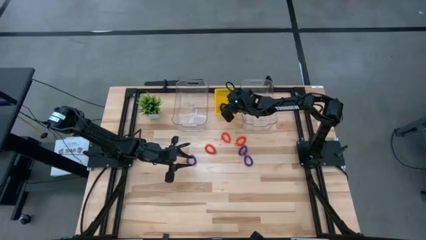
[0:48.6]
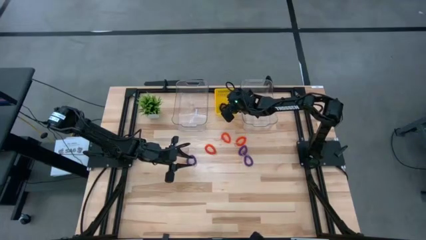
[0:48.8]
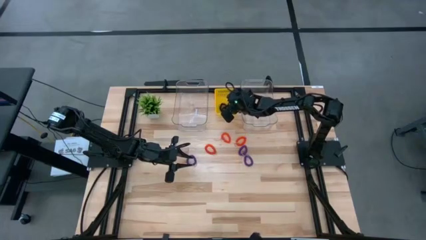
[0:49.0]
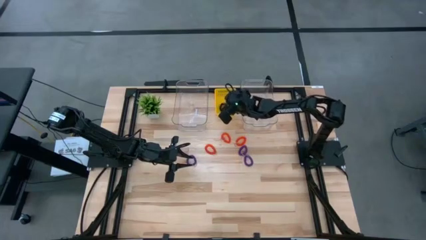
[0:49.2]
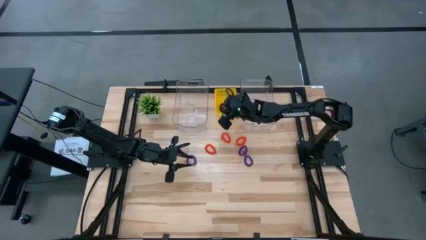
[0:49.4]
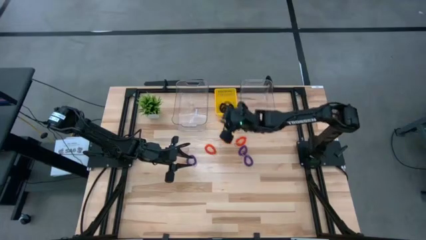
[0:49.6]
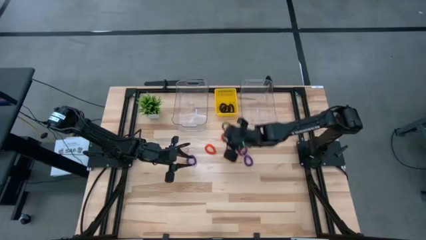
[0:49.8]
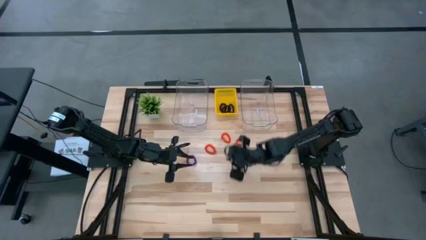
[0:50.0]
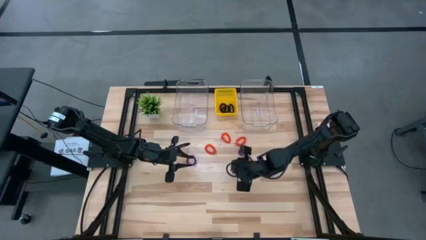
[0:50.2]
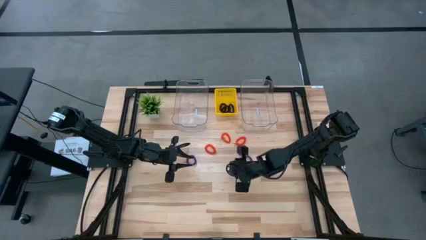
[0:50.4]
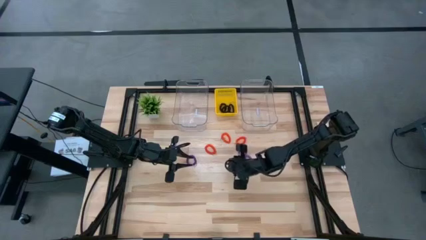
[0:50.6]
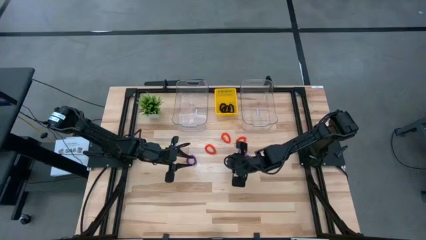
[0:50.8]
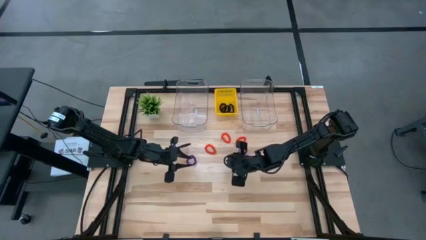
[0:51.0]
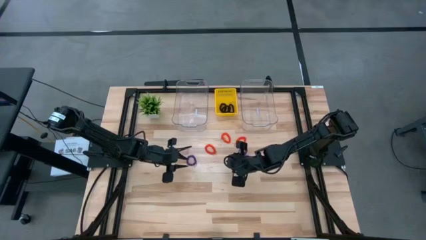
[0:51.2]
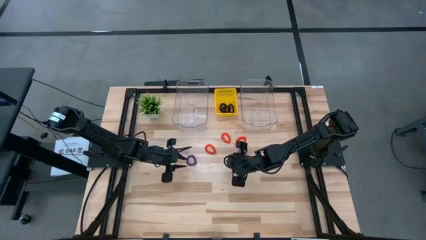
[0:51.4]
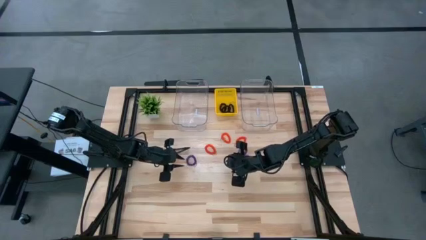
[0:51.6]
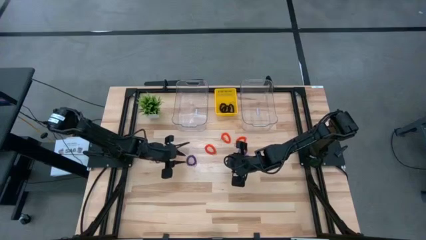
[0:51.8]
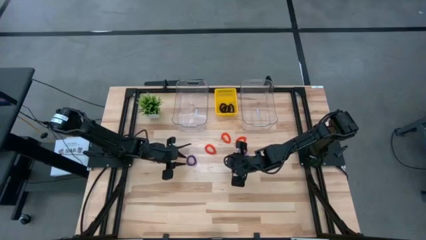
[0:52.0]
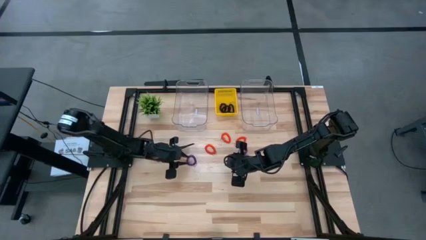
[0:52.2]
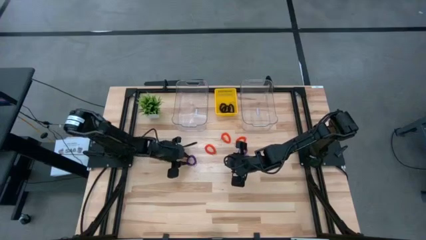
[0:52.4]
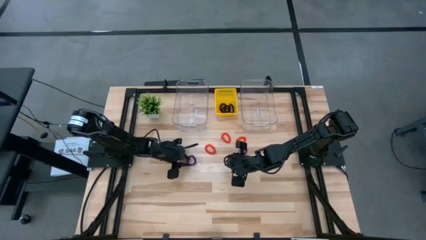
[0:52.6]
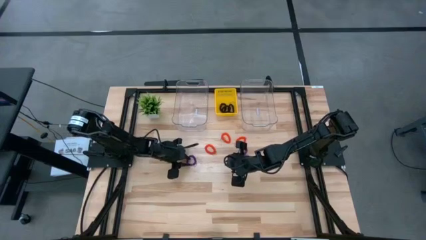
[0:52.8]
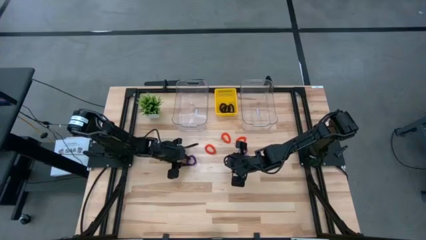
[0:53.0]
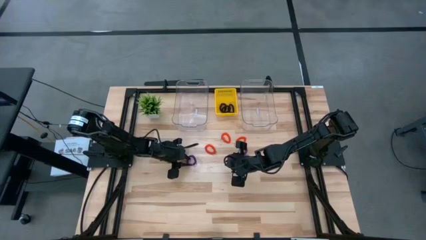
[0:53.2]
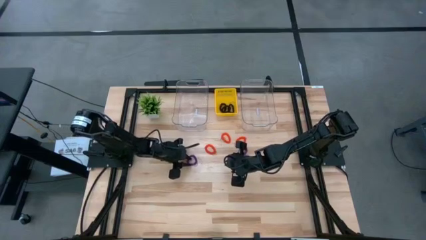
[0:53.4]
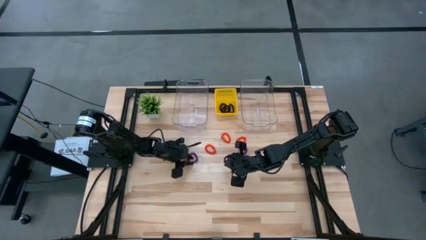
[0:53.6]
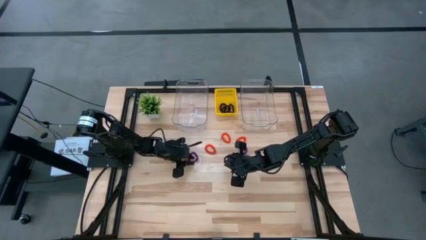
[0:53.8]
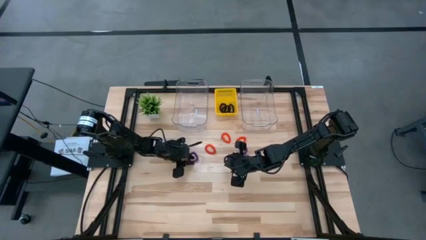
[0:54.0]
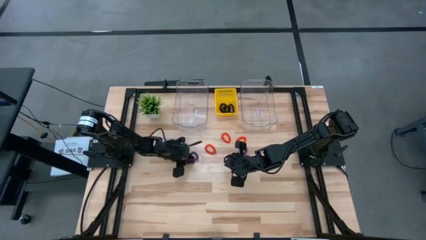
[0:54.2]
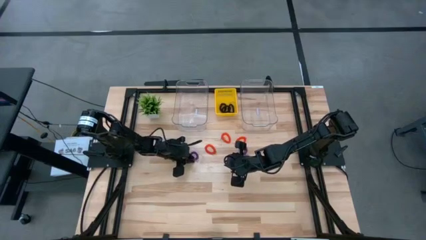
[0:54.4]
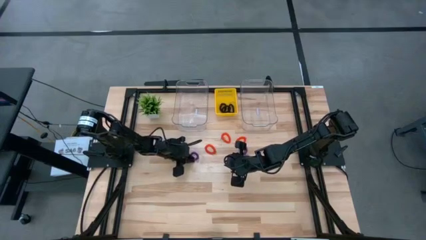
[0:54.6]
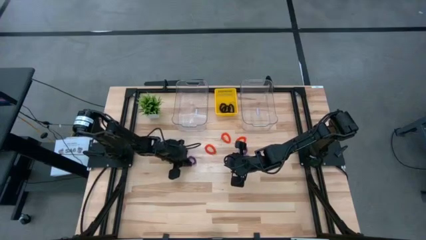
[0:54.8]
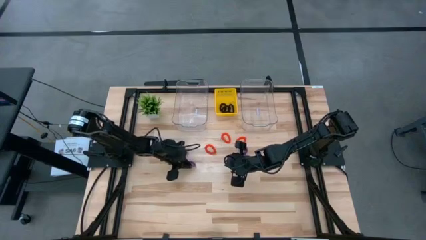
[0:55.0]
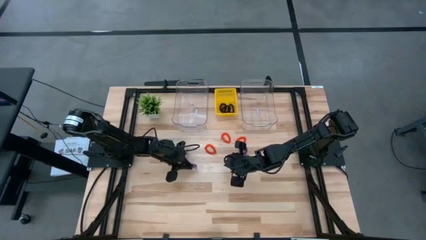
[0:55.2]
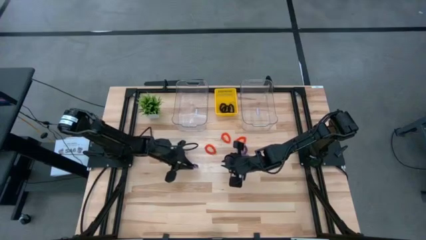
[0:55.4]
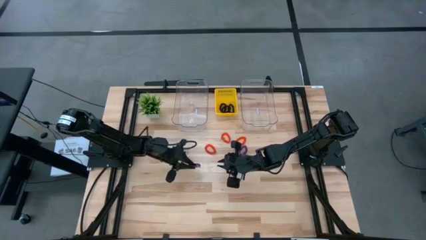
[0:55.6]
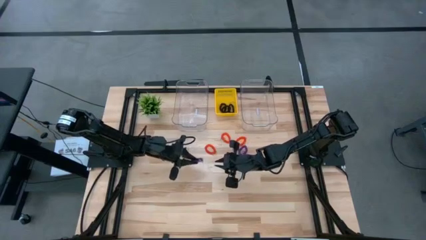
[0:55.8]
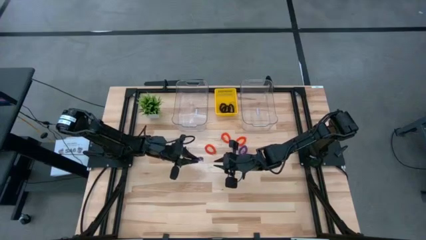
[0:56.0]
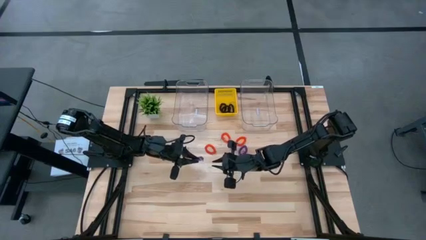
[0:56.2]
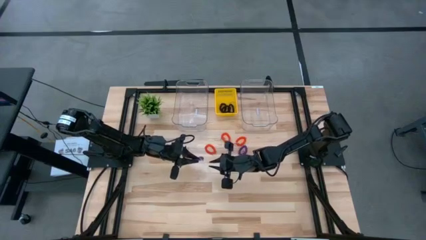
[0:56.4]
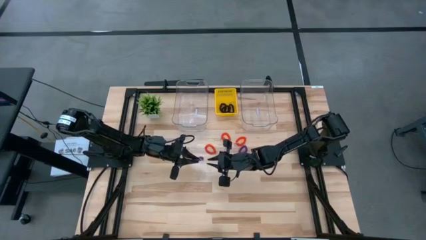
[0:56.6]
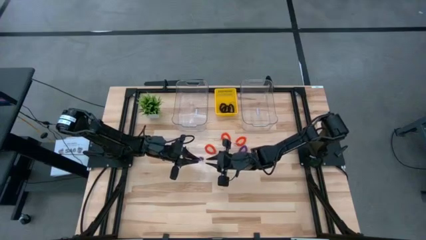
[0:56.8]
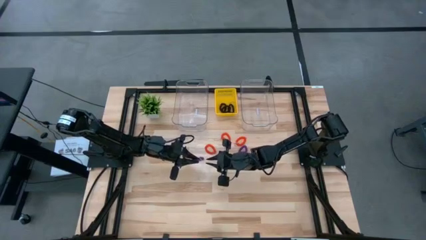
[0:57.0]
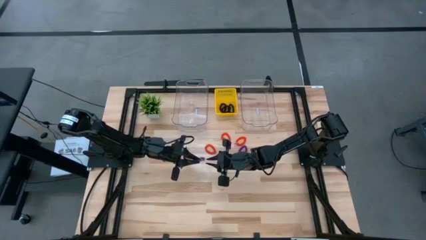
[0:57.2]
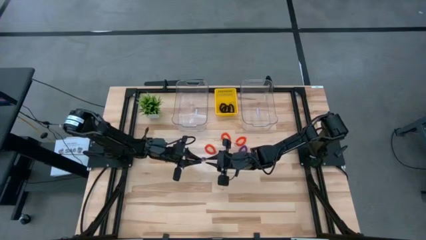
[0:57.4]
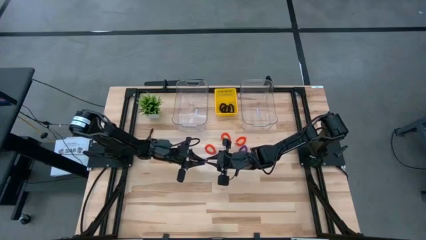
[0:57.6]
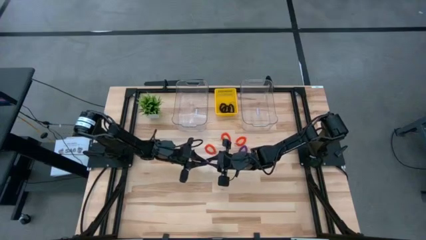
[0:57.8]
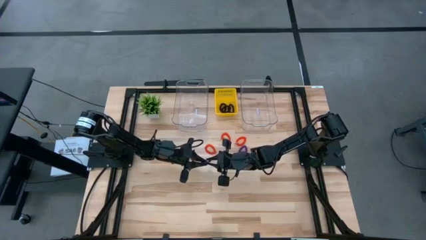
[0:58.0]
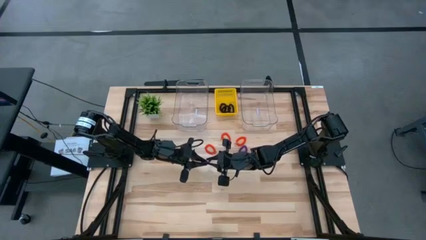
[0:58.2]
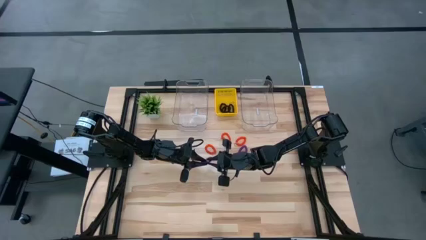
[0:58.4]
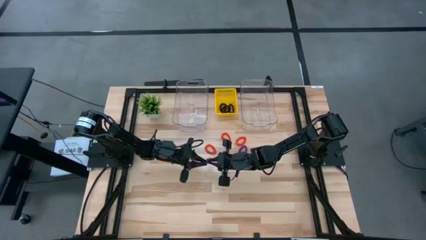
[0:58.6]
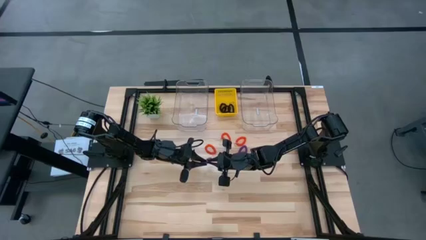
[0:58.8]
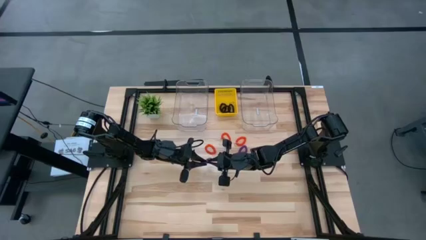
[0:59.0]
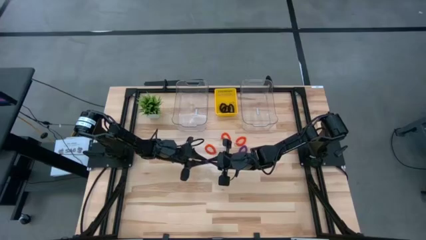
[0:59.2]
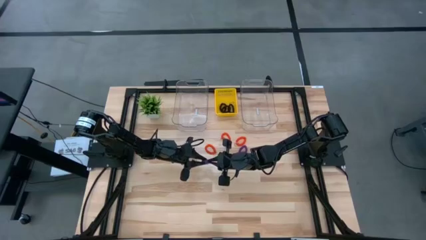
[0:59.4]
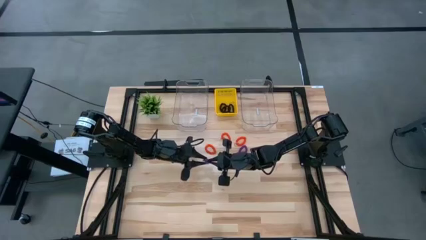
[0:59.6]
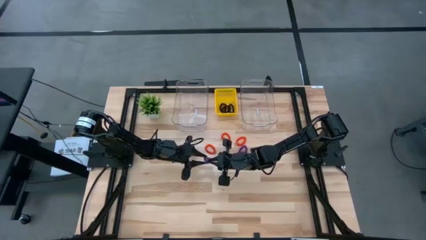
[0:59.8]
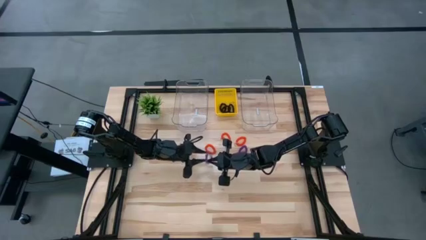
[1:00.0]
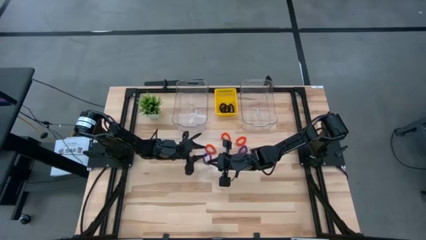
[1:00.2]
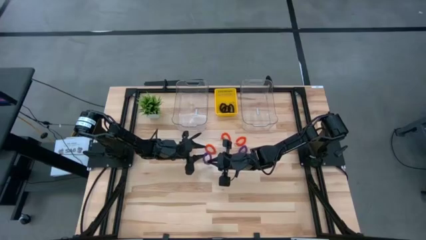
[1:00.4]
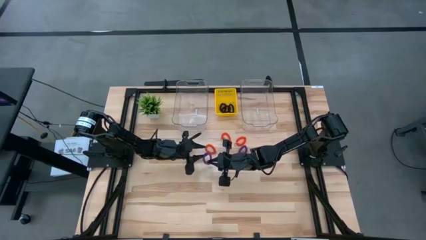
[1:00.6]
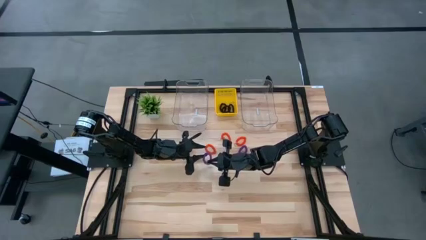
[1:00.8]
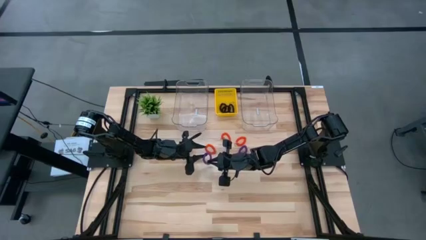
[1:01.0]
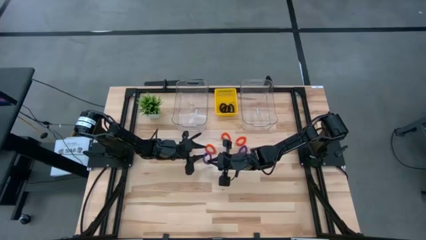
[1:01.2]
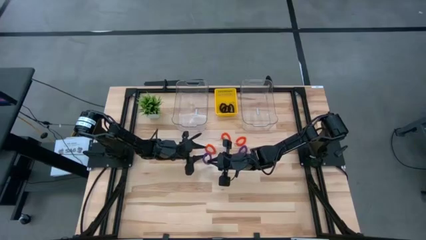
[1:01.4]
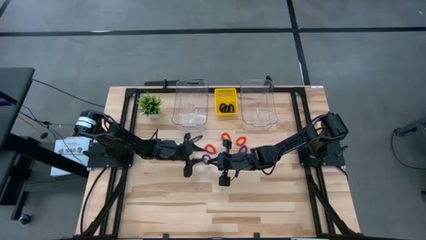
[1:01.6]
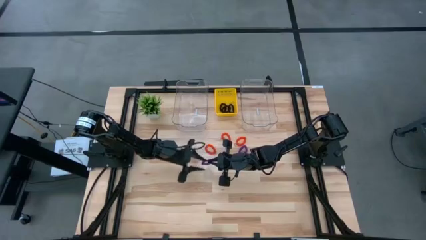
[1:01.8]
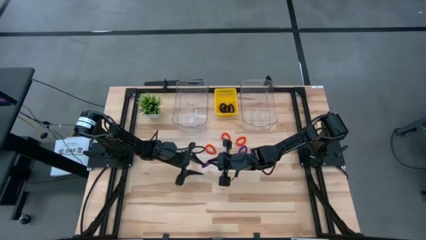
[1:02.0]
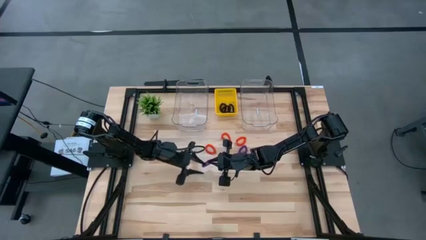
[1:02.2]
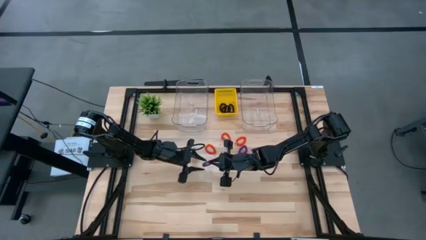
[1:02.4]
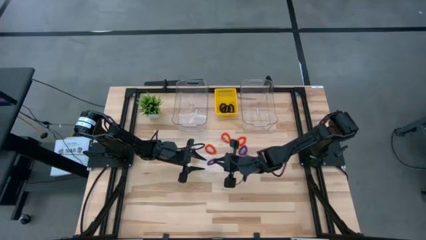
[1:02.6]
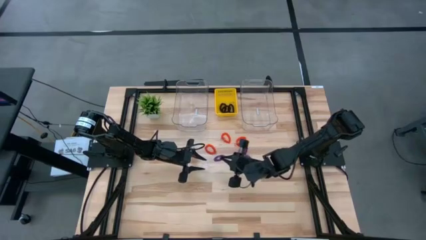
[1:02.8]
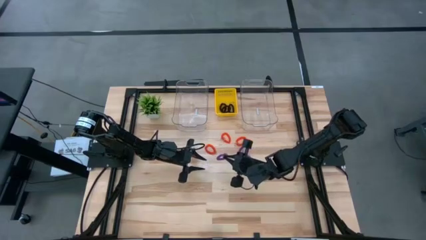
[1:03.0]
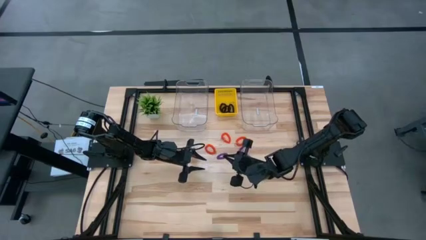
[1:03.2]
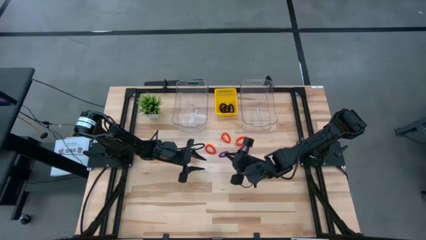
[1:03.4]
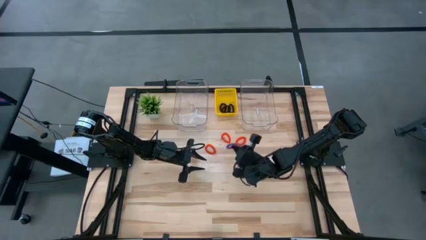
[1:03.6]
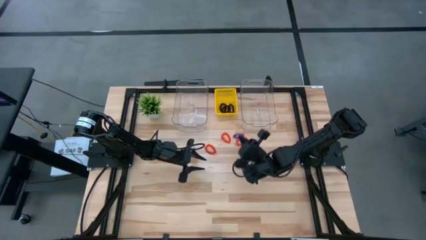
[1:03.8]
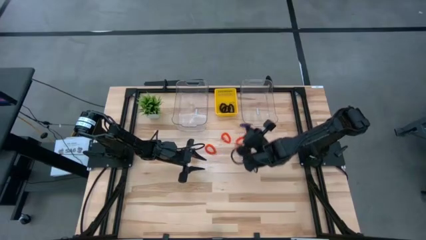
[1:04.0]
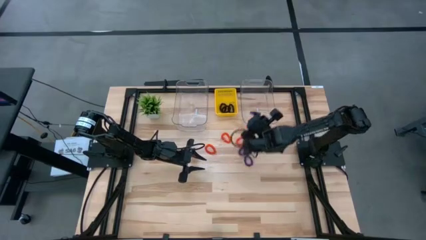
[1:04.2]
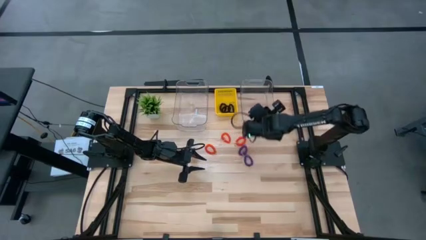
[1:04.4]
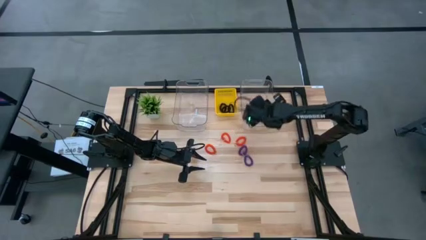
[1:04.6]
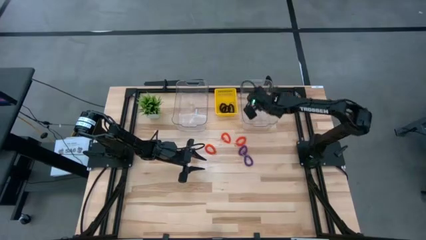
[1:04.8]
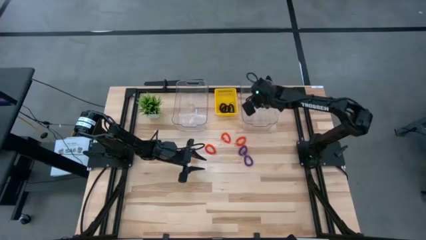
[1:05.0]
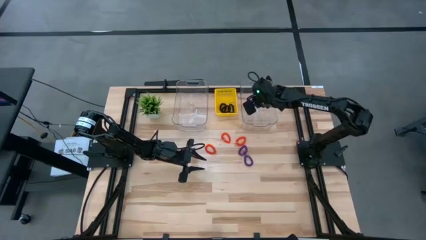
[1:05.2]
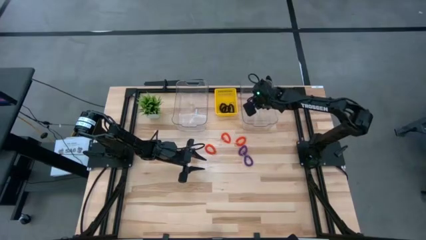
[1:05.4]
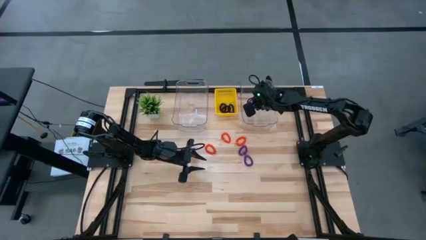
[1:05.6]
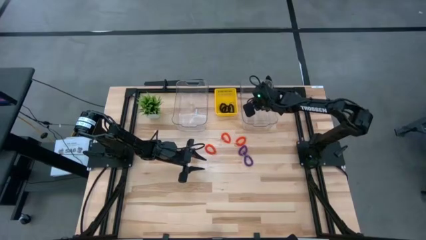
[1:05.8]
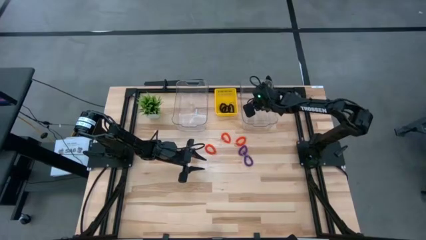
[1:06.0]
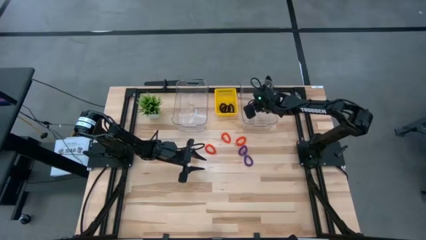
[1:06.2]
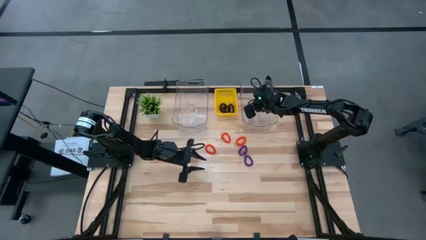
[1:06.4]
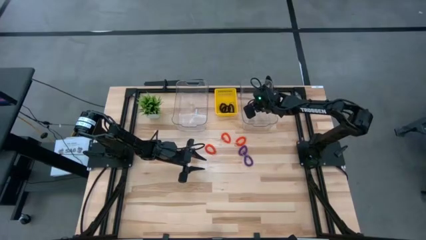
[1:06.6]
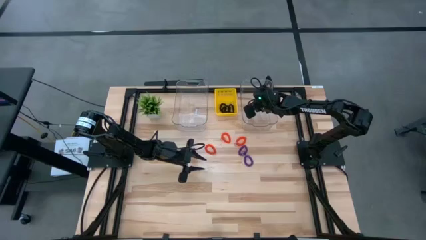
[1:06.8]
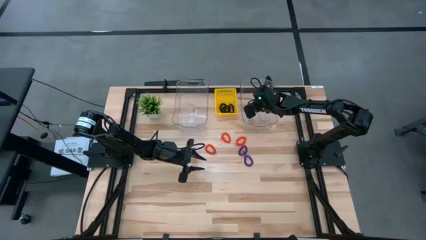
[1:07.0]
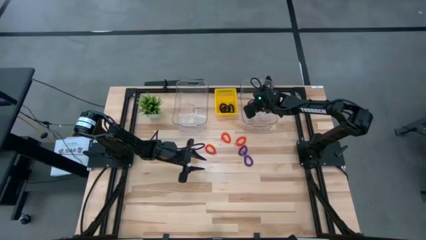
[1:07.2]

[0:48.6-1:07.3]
Task: Sort spring keychains
Put the left purple spring keychain into the right transparent bin
